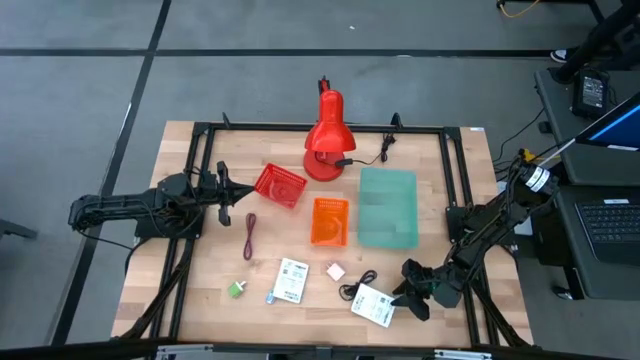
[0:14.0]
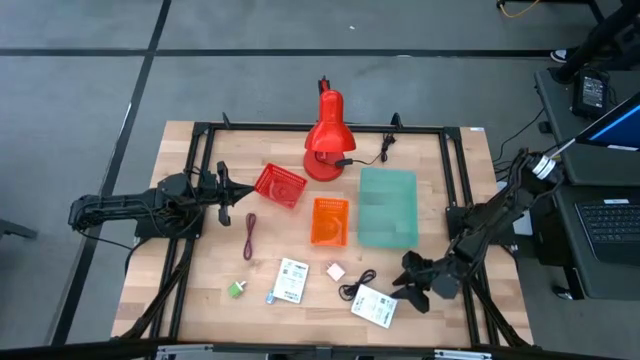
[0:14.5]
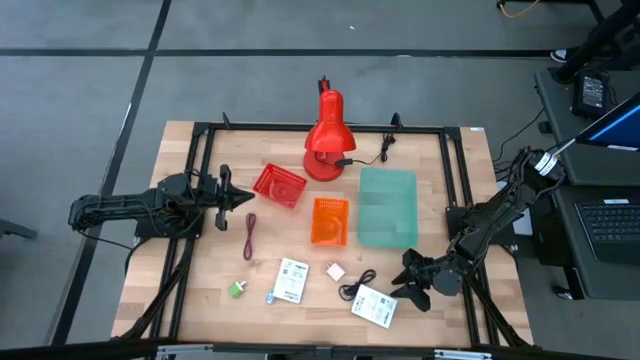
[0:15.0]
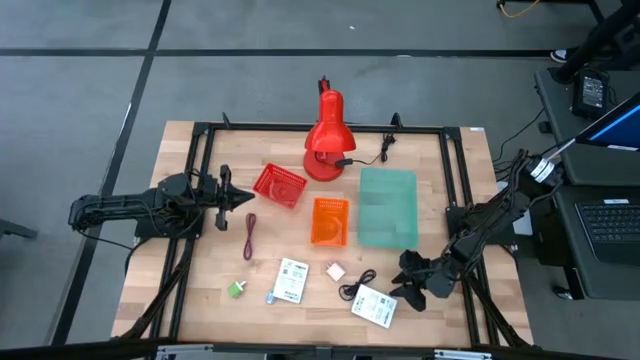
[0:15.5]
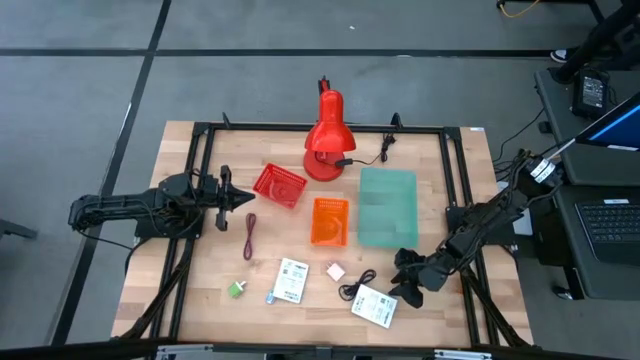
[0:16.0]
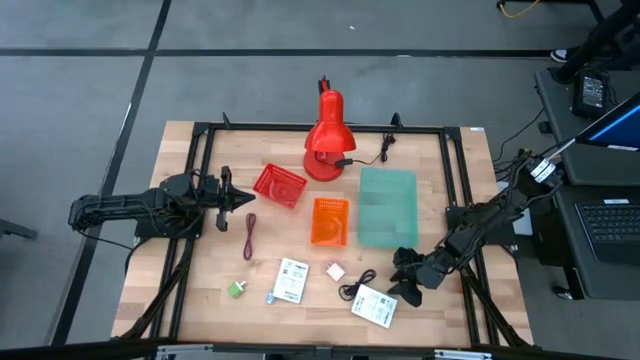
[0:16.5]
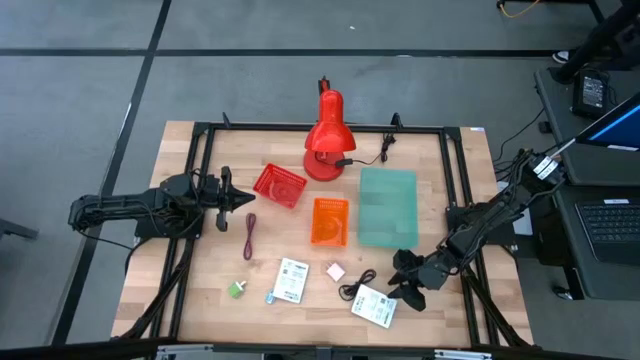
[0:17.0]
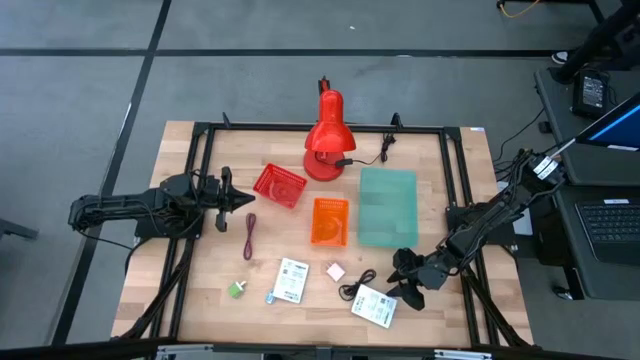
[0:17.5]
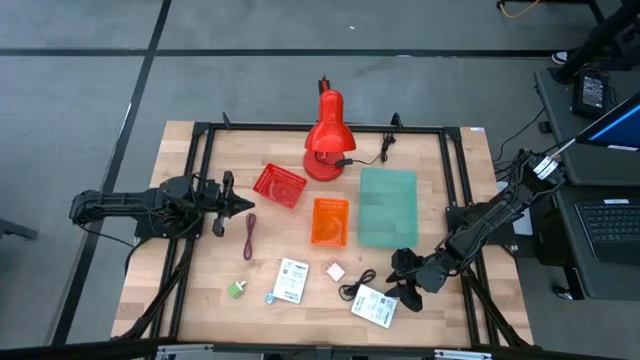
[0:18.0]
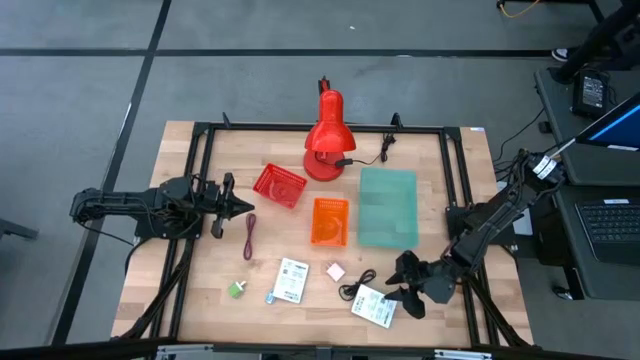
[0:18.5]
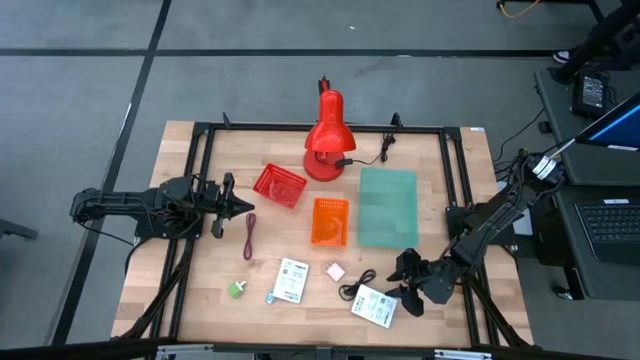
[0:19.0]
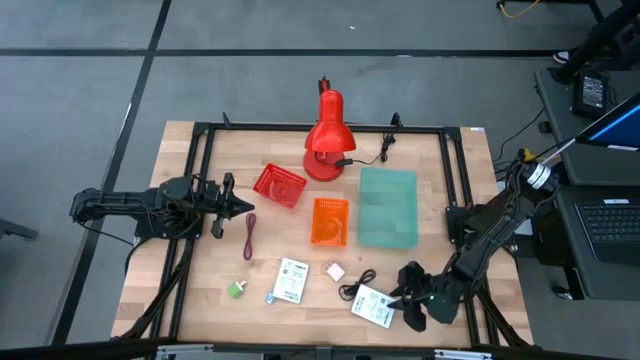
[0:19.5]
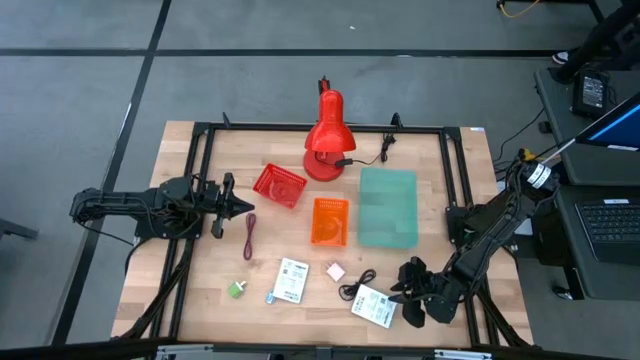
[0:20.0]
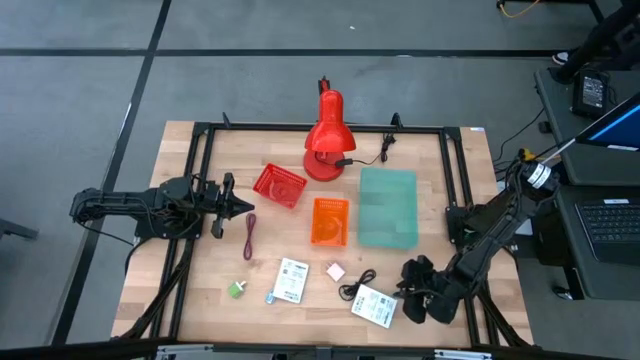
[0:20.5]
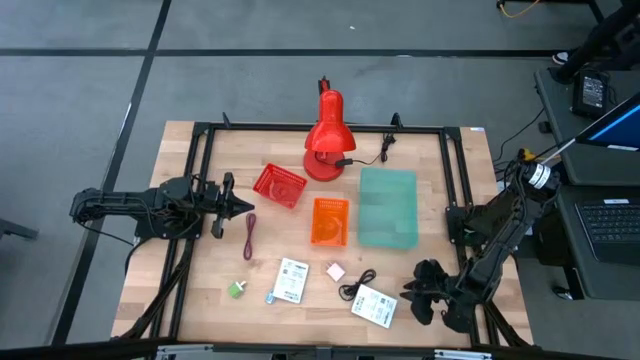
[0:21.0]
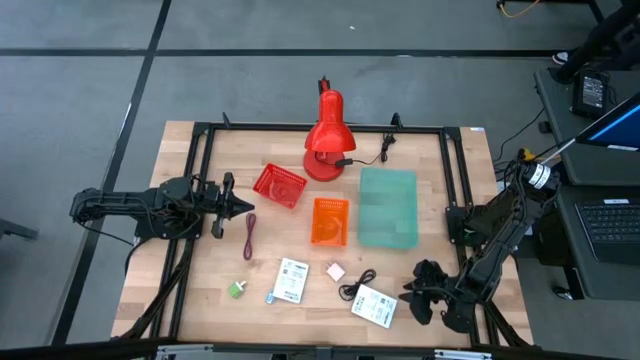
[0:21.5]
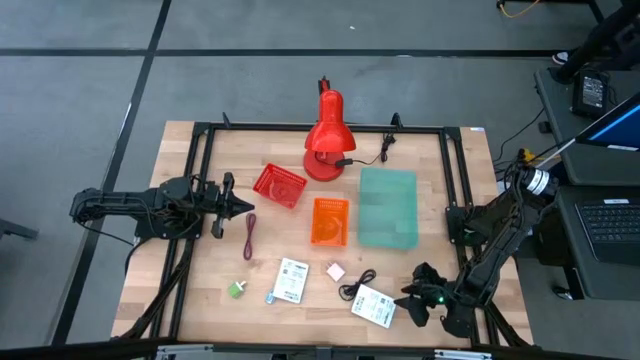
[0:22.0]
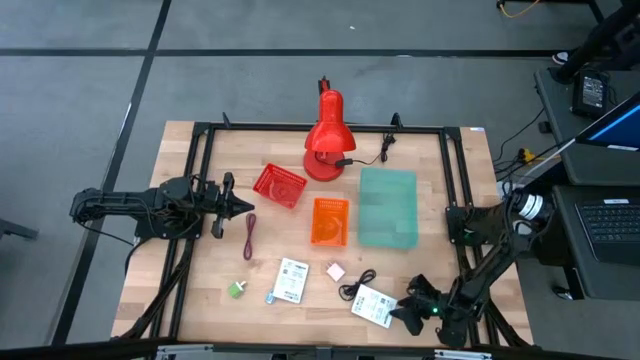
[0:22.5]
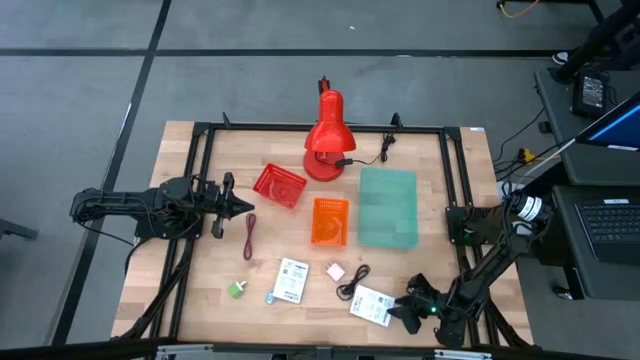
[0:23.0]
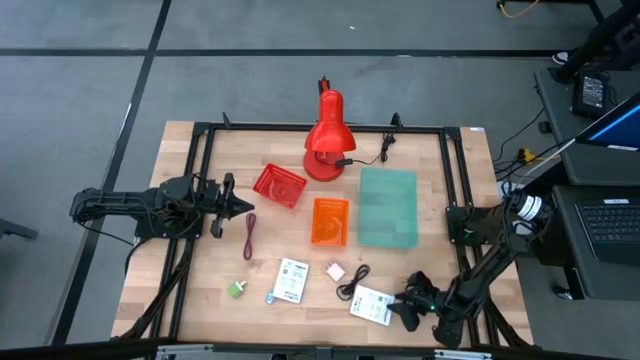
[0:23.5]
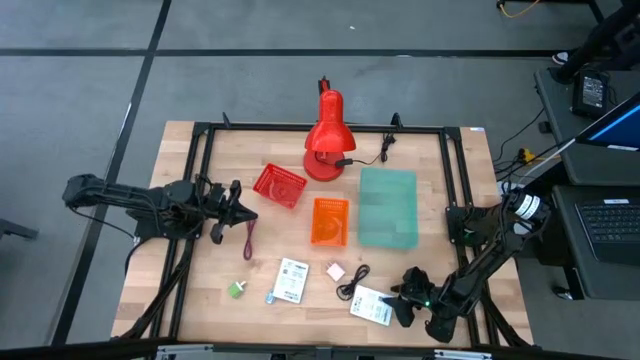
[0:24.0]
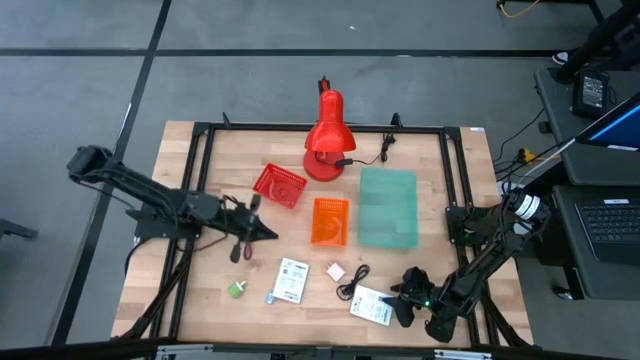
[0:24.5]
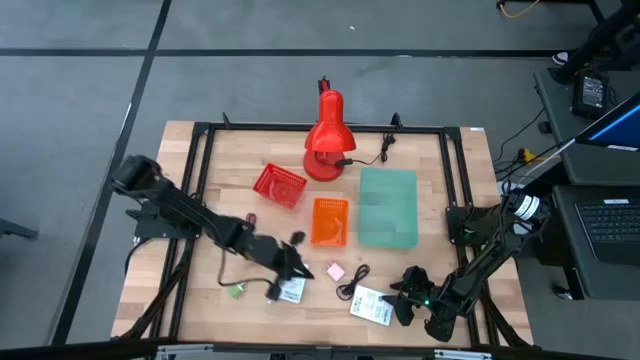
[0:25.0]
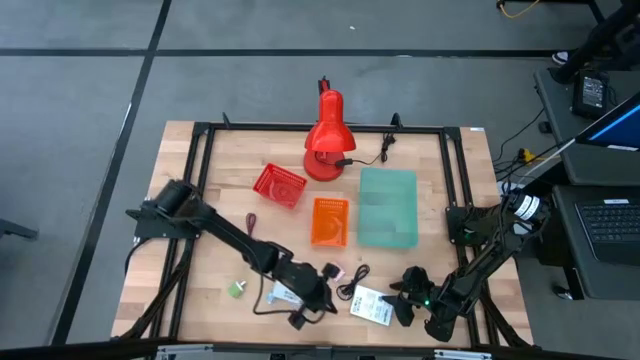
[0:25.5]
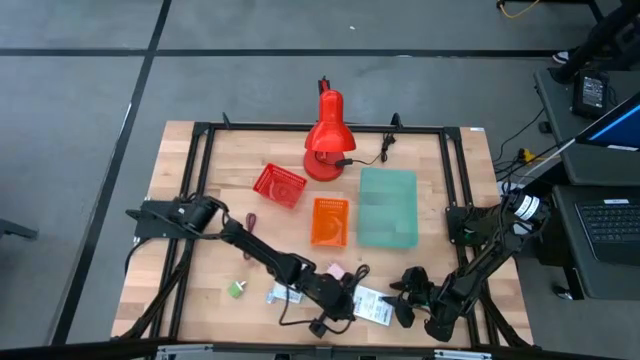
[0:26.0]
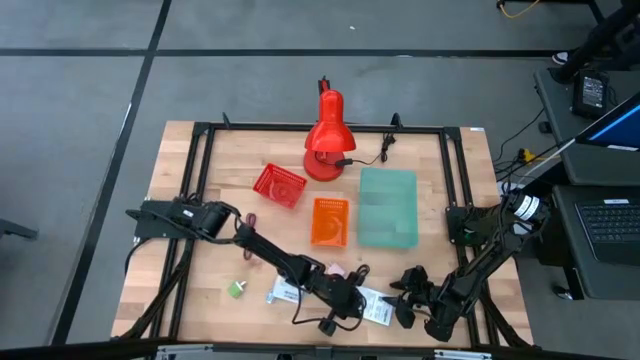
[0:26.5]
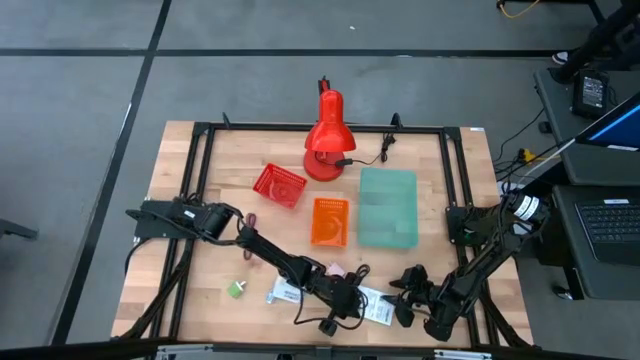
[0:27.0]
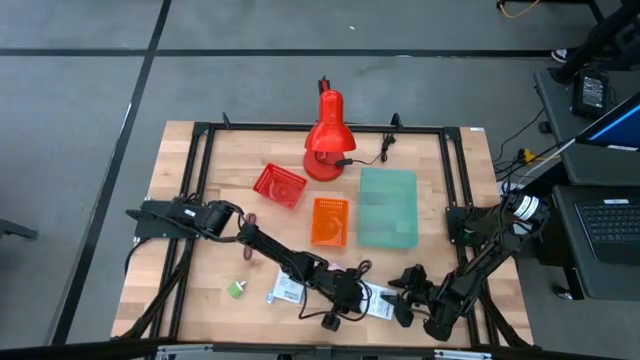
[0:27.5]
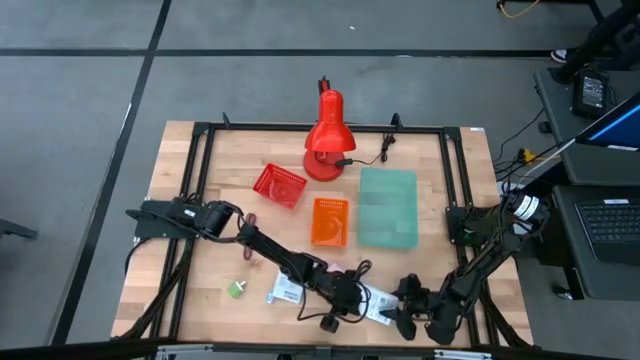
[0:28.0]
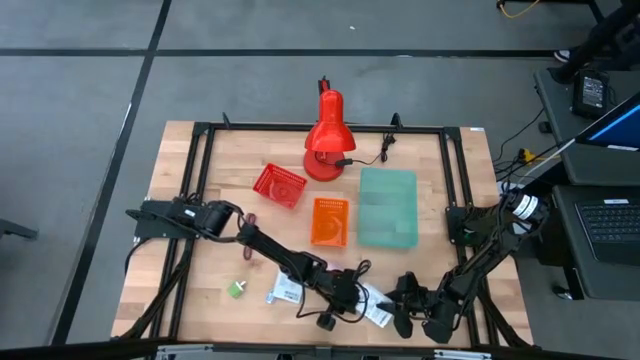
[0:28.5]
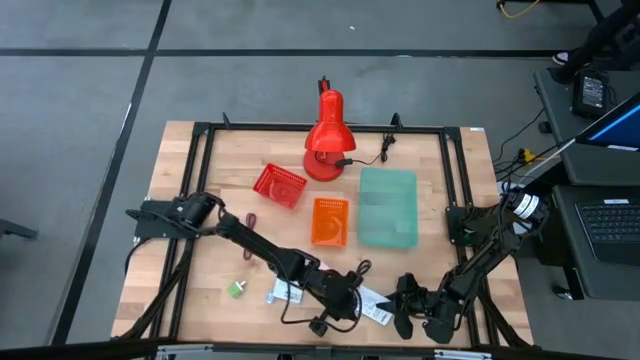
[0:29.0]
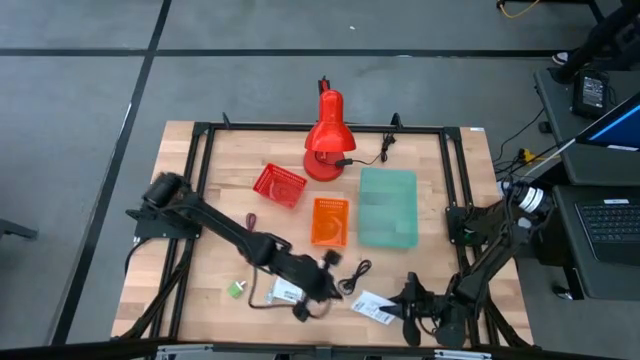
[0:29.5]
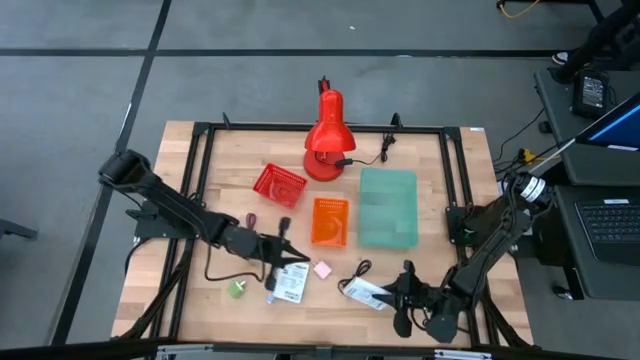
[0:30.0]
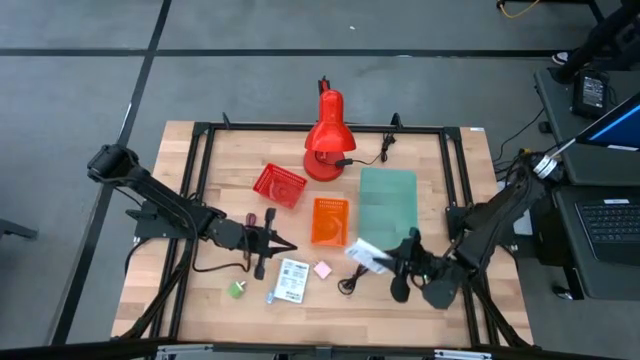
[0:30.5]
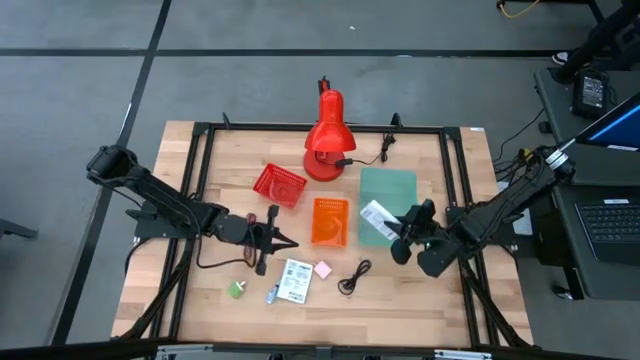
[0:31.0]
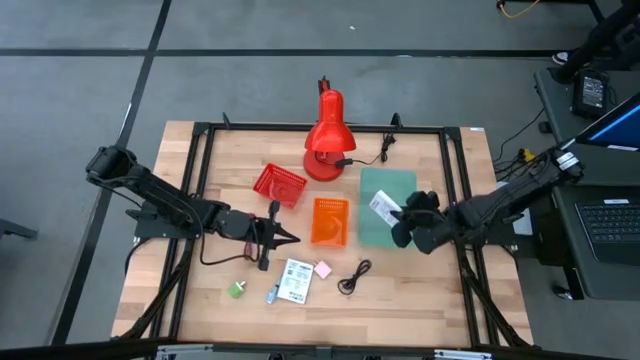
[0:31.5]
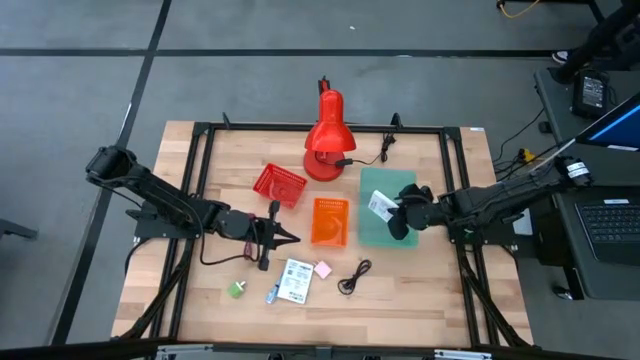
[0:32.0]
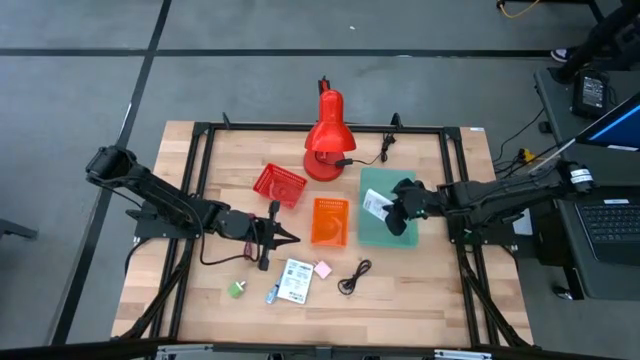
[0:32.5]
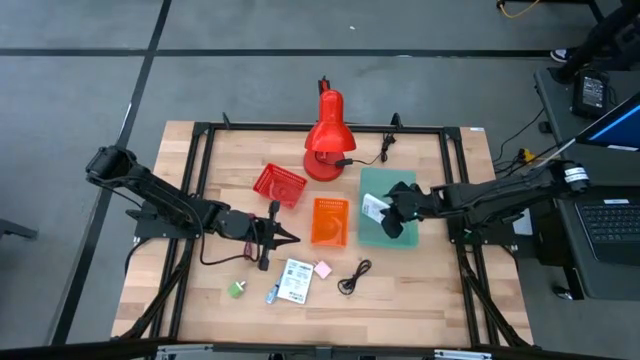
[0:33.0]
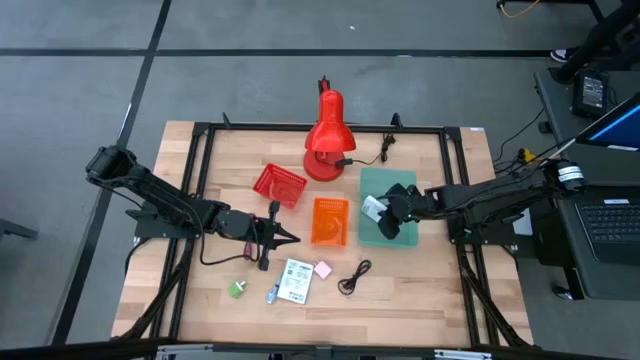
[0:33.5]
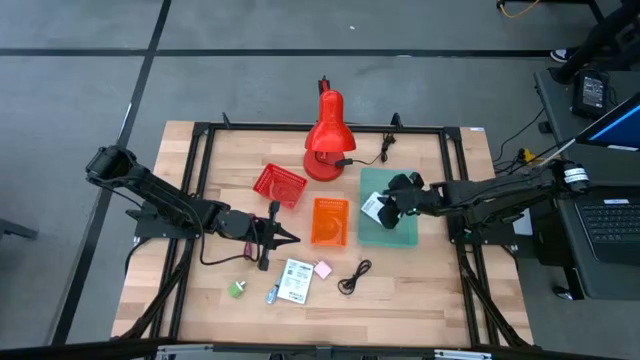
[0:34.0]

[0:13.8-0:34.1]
Task: Pick and place items into bin
Put the white card reader box into the light blue bin
